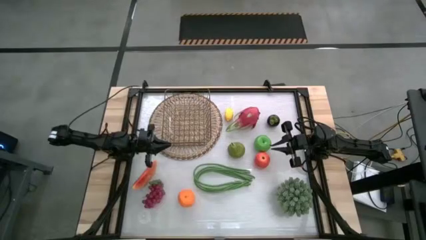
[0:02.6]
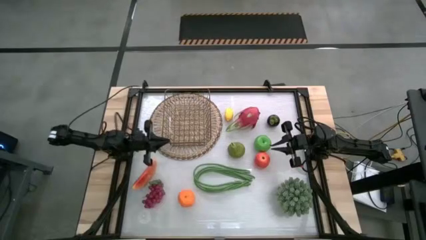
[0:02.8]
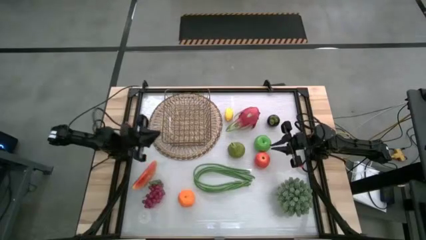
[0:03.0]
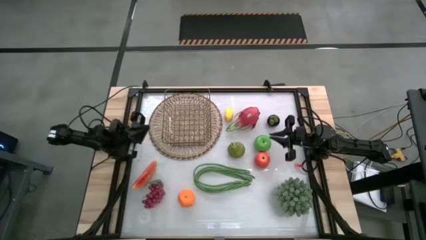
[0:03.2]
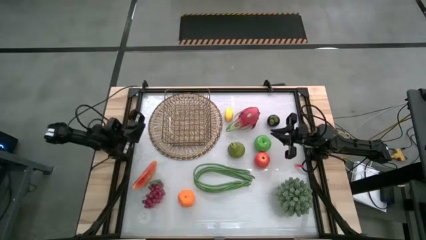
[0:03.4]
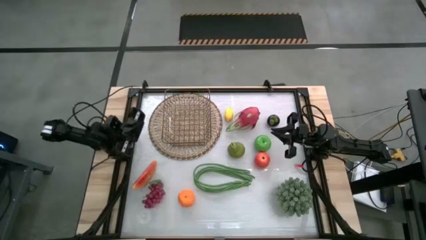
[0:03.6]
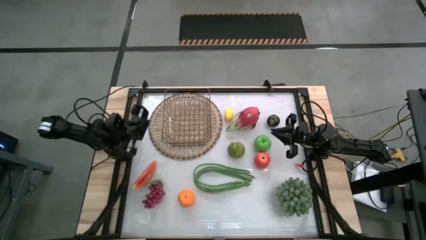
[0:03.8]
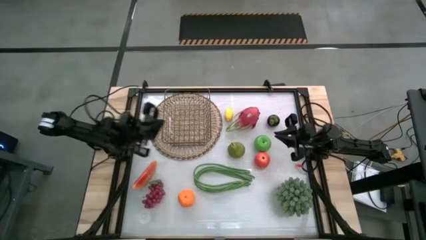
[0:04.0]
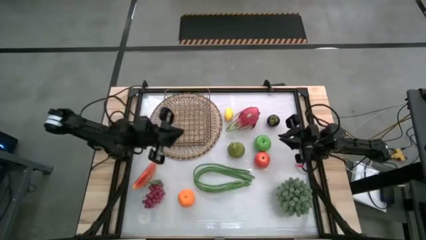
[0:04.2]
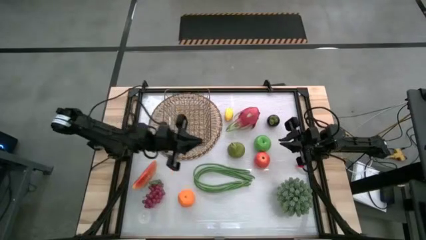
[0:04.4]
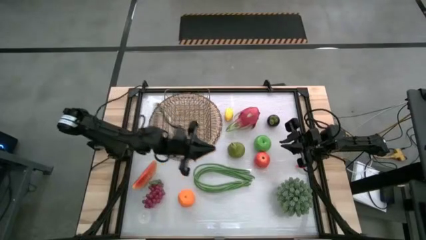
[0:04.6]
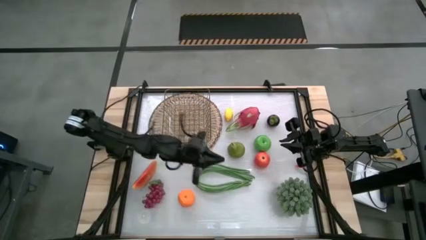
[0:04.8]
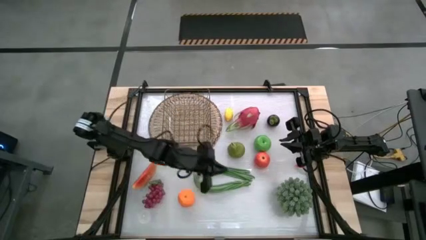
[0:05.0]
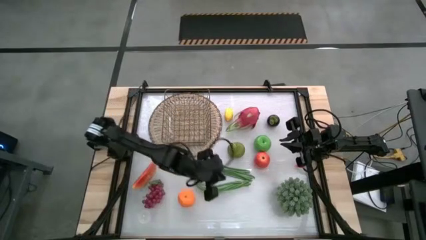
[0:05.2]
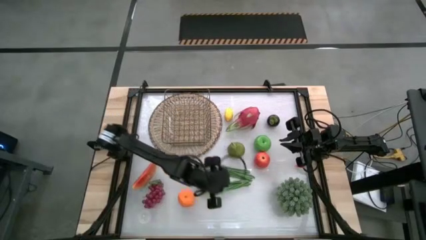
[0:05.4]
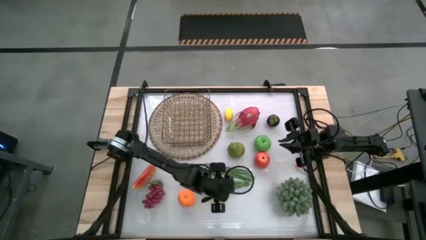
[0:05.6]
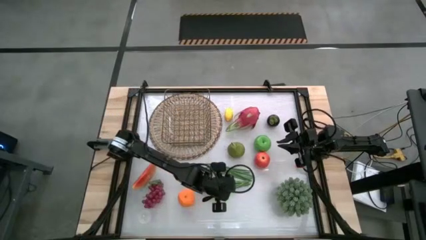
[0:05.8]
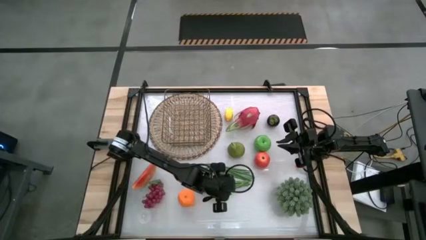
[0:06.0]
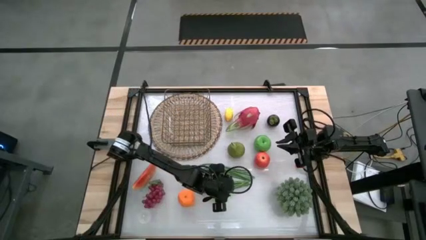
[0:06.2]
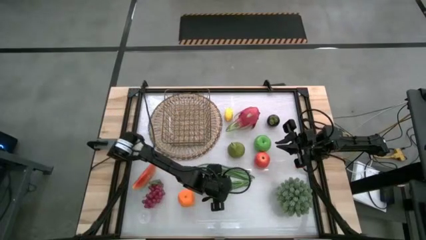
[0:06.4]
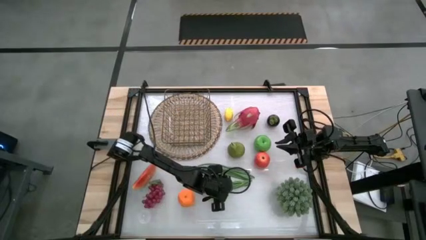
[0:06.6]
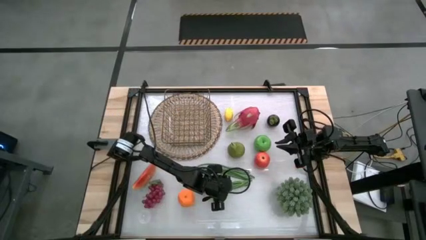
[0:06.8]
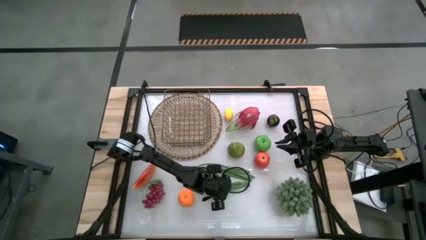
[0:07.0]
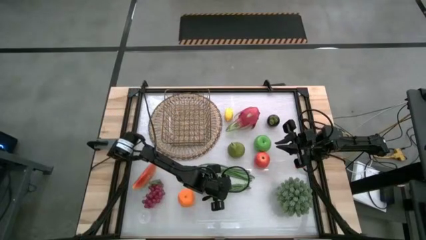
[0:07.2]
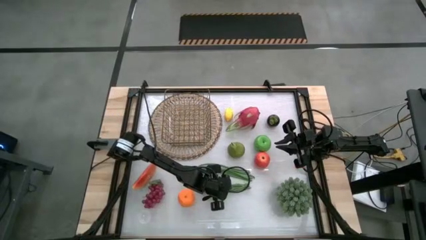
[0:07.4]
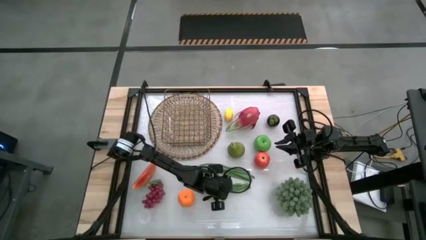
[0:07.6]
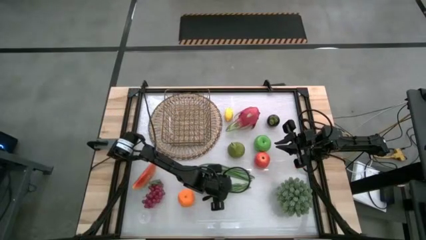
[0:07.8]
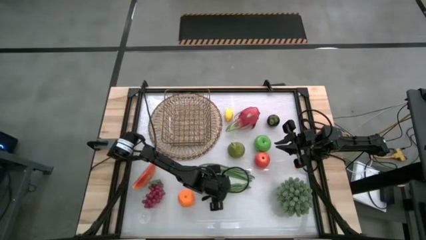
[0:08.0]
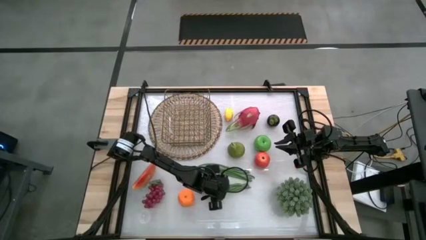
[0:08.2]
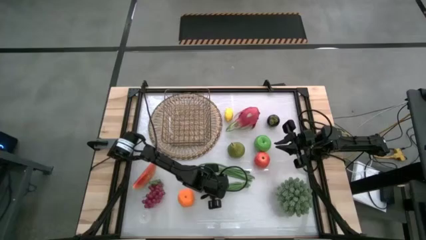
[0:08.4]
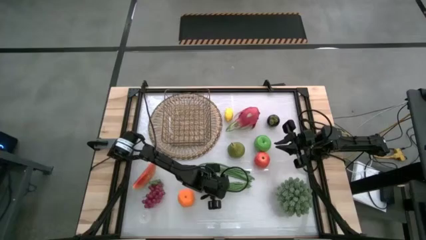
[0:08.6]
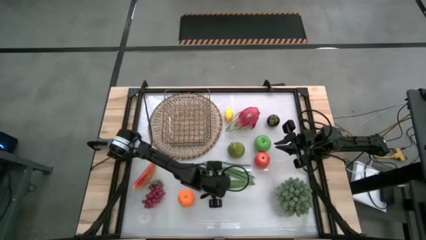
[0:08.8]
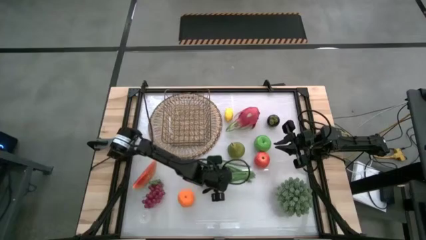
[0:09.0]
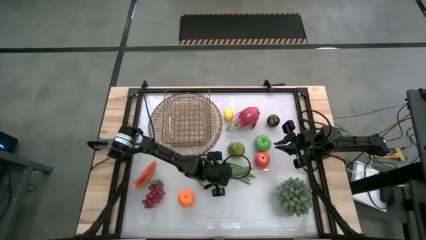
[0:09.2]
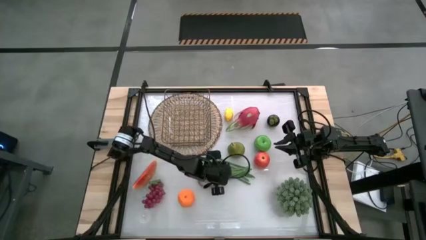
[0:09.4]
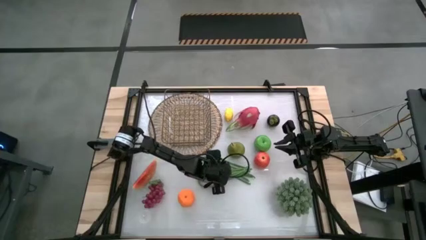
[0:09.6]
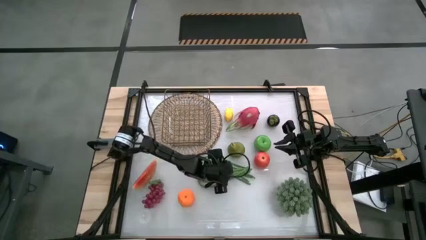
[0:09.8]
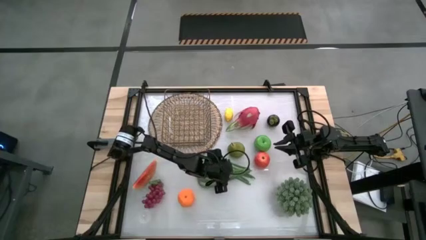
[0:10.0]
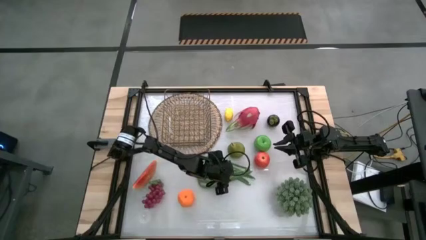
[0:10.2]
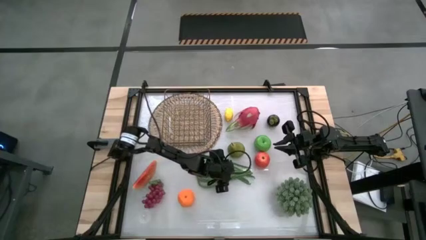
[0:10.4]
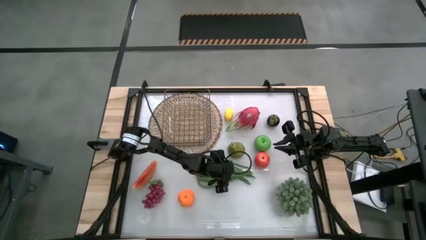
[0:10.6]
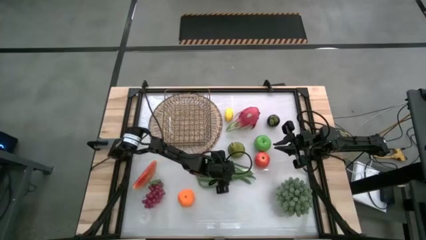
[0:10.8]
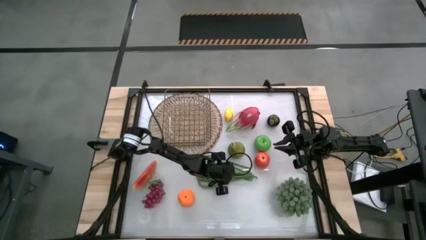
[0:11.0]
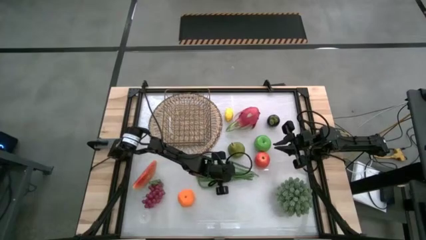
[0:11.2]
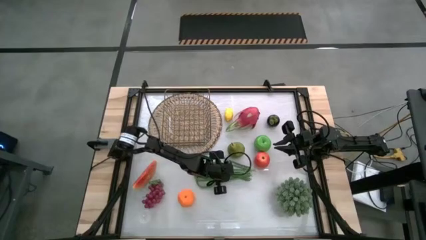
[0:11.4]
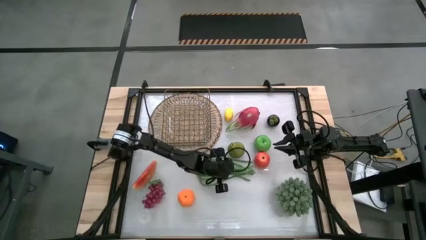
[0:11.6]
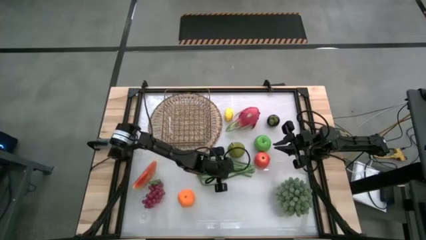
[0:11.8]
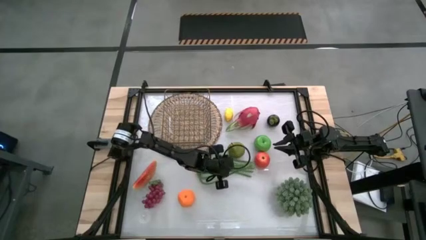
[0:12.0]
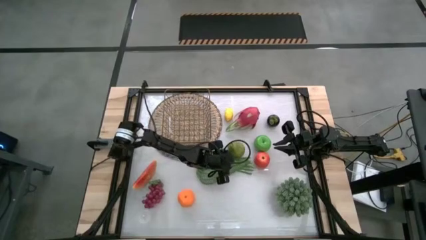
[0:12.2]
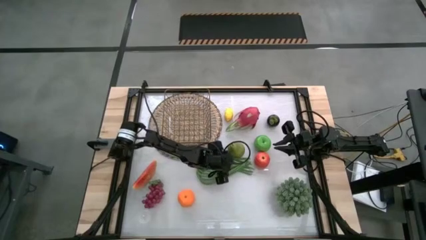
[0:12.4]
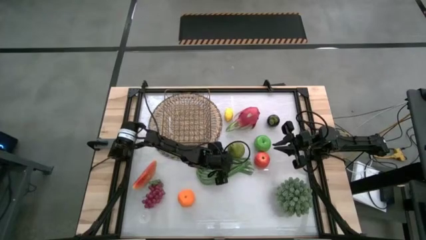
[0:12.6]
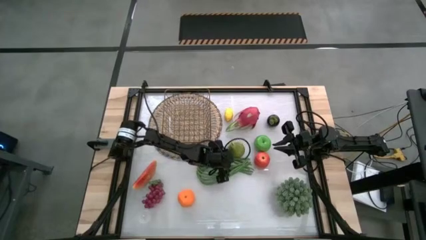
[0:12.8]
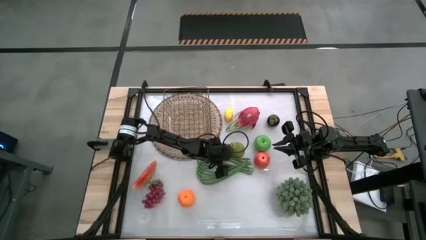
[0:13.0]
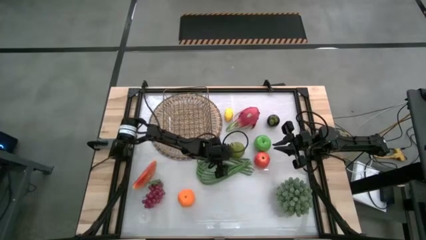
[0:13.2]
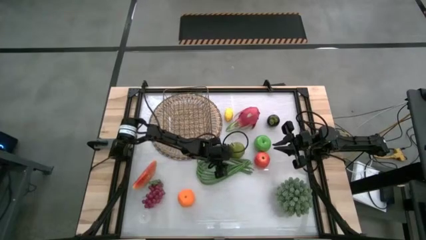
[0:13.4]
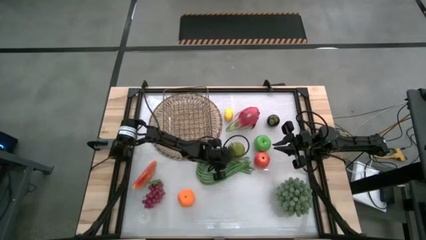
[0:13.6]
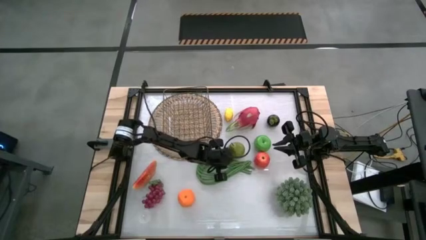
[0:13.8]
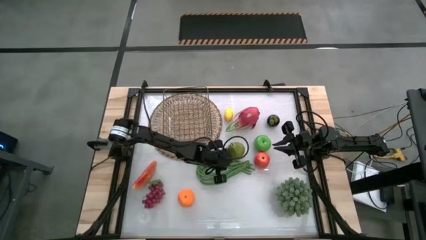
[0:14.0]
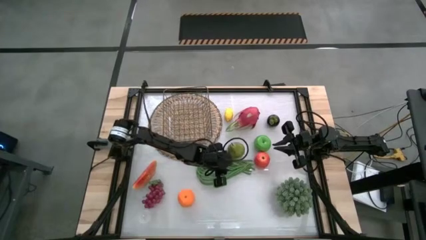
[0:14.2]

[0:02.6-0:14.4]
Task: Build produce basket
Put the green string beans into the wire basket

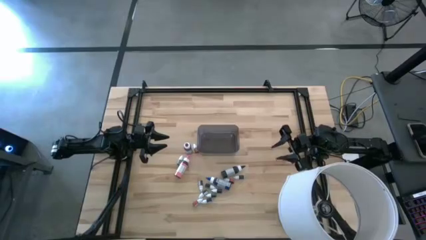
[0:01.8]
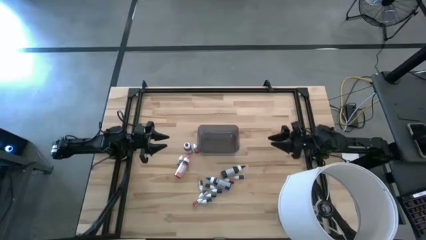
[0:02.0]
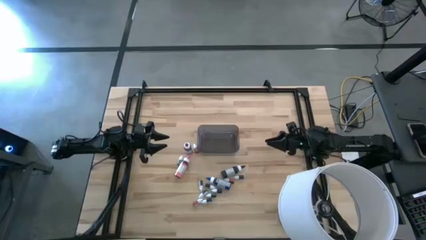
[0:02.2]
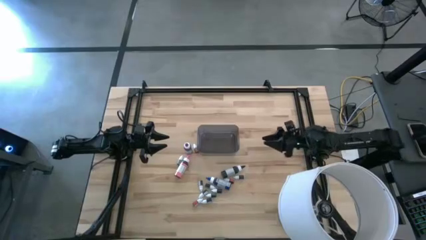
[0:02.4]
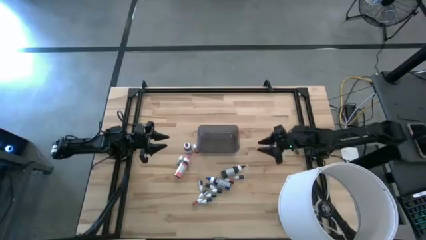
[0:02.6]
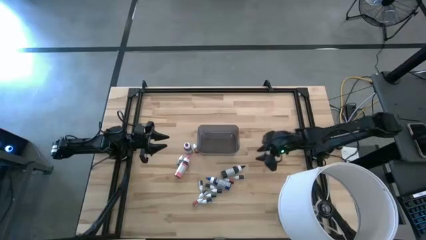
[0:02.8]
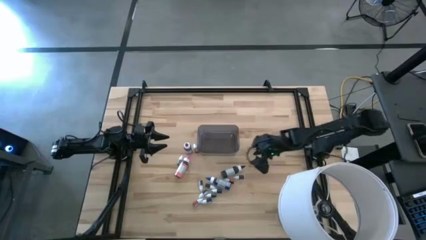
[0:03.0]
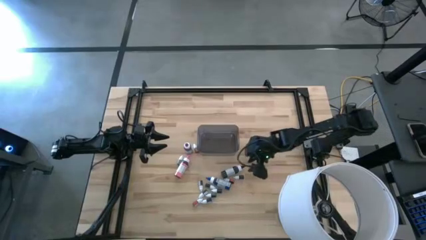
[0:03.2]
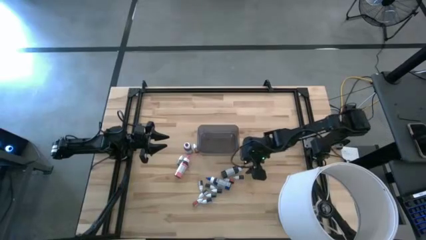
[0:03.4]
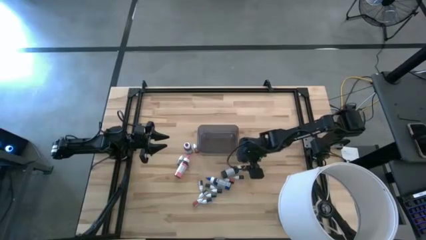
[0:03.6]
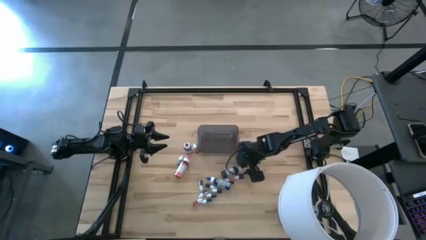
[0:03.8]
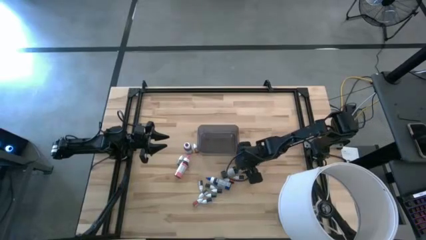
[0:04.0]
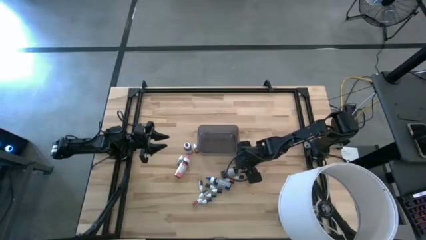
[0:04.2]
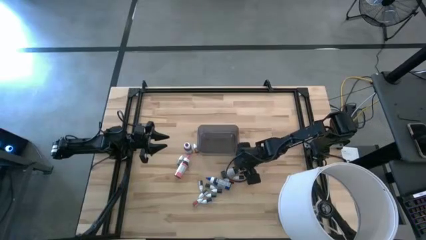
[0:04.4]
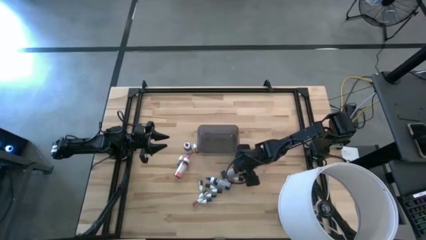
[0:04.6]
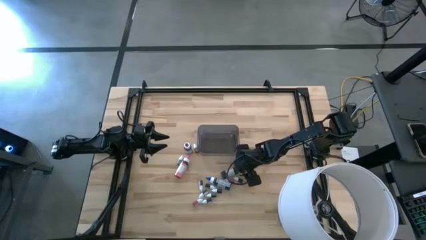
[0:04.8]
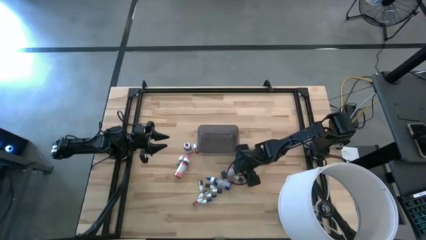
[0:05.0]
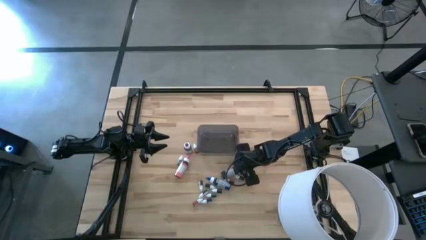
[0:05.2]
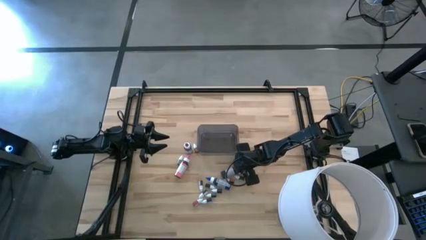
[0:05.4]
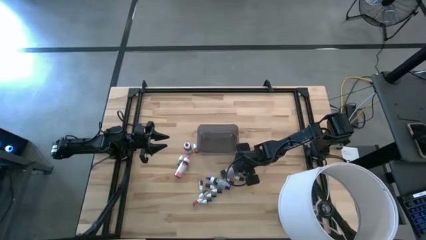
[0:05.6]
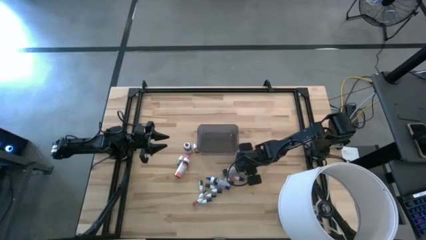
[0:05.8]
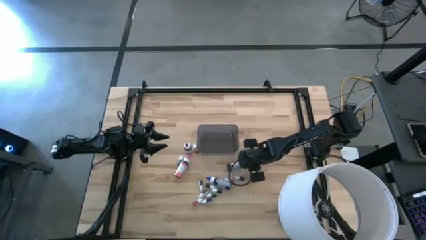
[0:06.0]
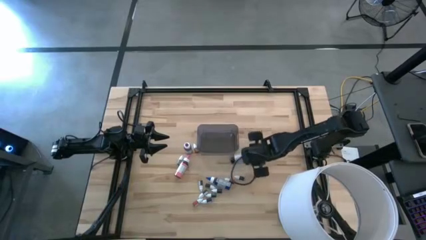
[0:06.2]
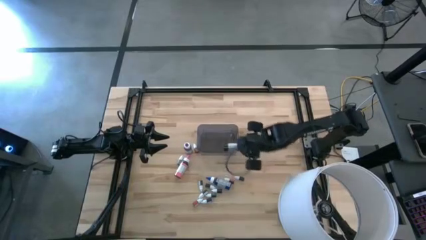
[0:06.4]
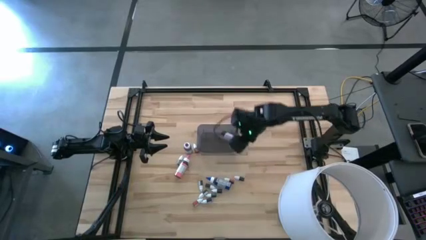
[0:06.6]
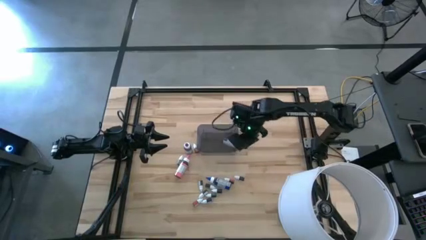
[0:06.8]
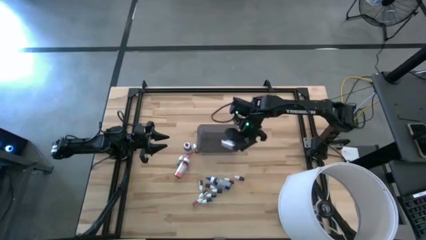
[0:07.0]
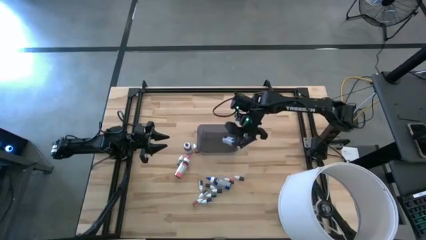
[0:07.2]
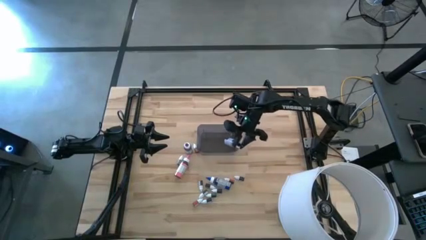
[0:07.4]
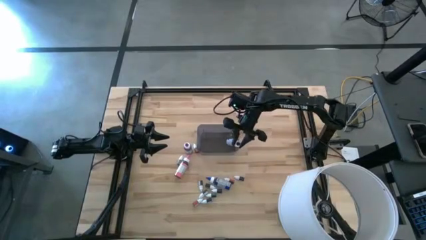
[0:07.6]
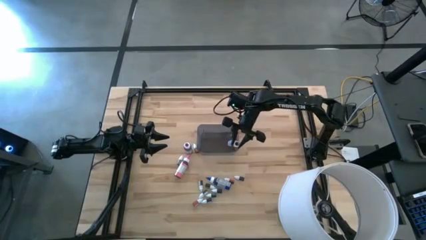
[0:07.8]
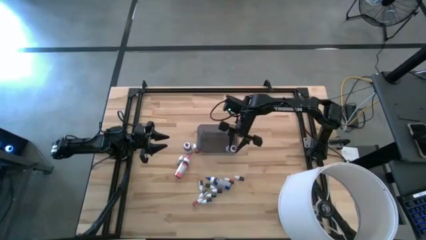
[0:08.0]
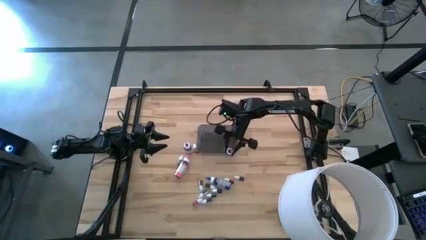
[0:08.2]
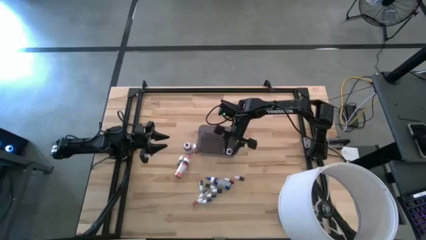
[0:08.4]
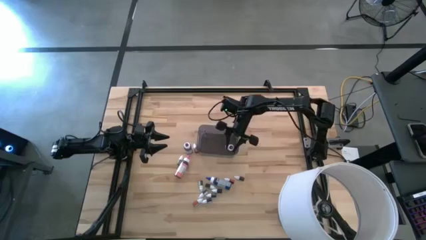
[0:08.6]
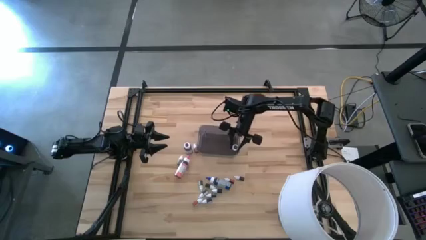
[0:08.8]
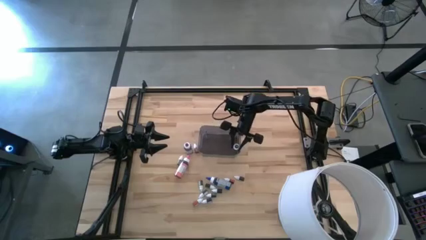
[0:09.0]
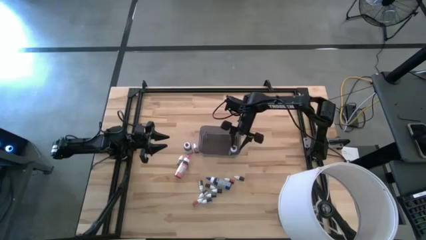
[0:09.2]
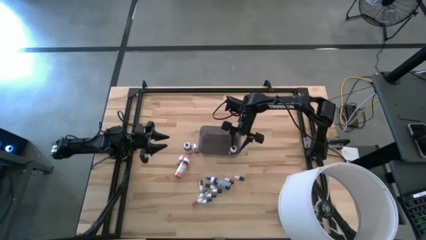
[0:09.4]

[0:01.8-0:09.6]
Task: Pick & Place food coloring
Put the large black food coloring bottle in the black bin
